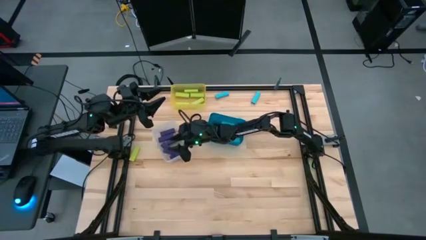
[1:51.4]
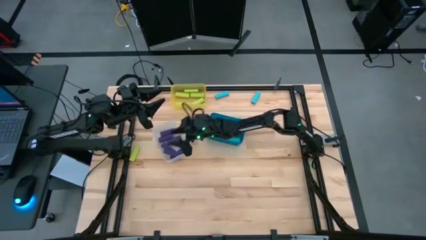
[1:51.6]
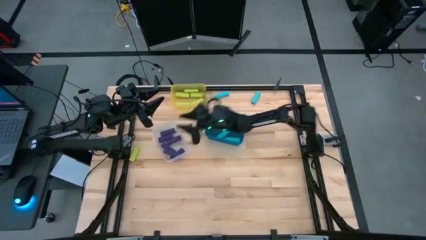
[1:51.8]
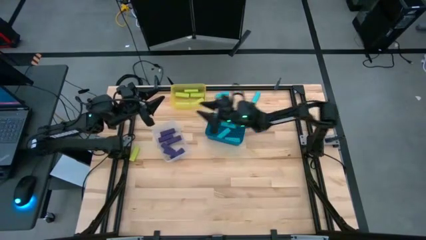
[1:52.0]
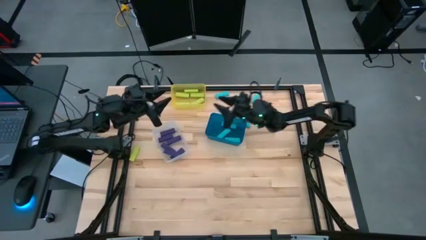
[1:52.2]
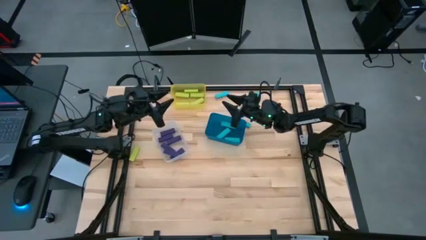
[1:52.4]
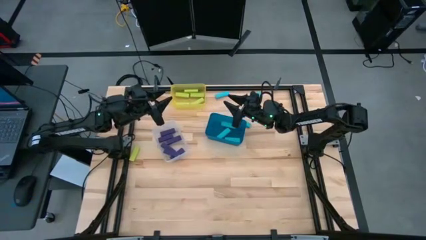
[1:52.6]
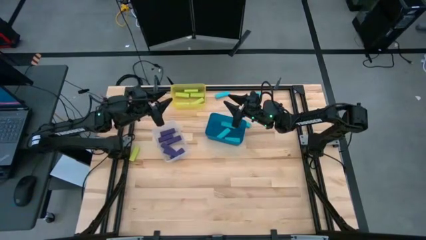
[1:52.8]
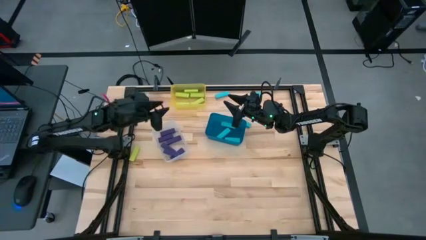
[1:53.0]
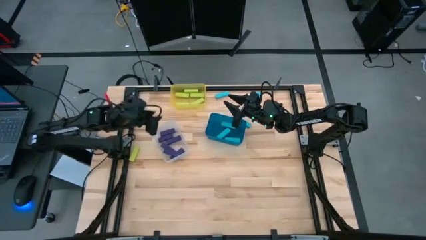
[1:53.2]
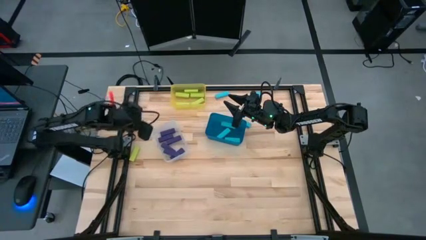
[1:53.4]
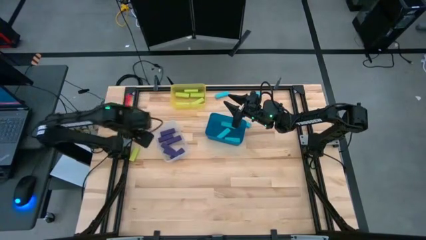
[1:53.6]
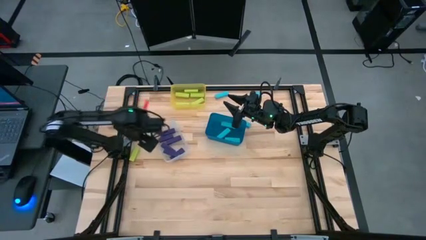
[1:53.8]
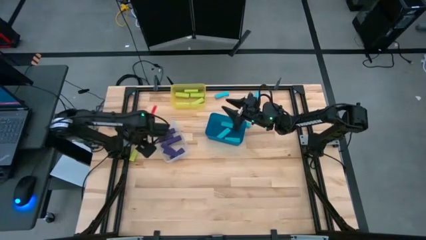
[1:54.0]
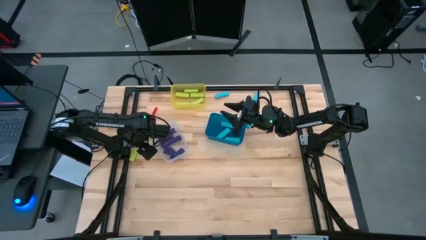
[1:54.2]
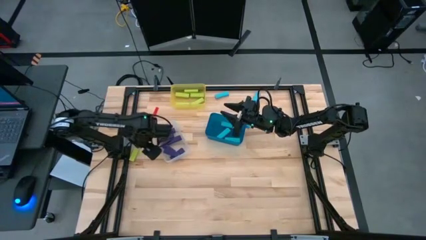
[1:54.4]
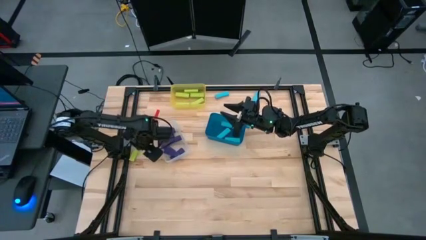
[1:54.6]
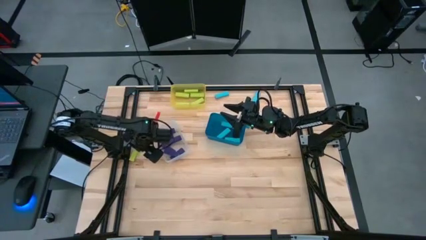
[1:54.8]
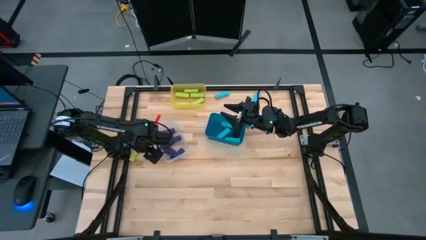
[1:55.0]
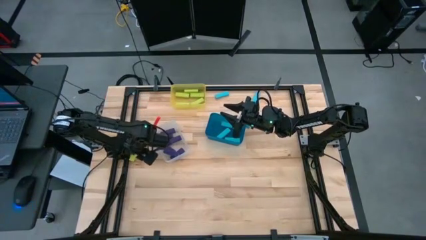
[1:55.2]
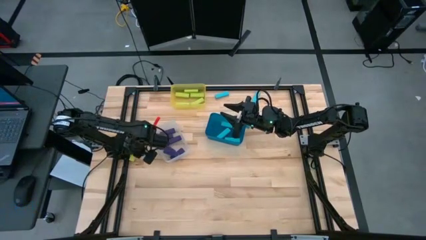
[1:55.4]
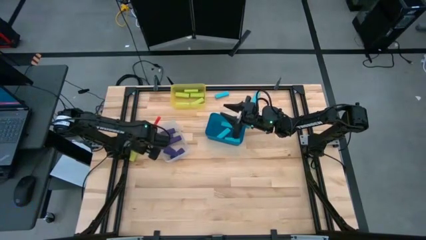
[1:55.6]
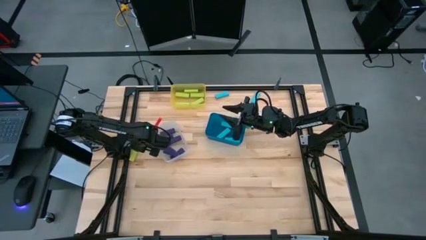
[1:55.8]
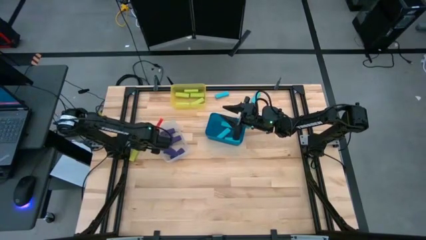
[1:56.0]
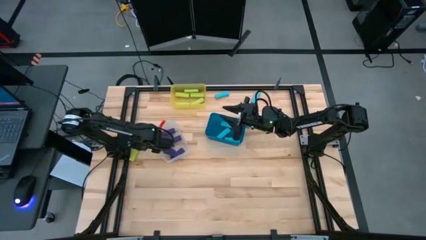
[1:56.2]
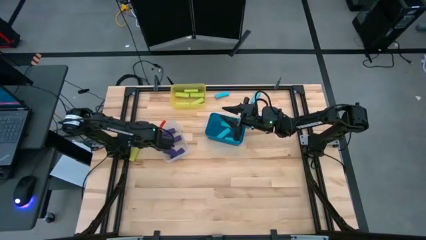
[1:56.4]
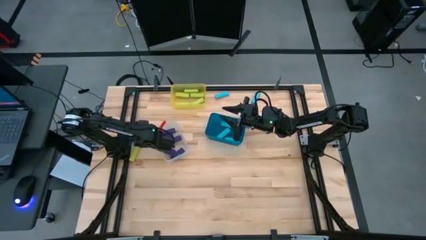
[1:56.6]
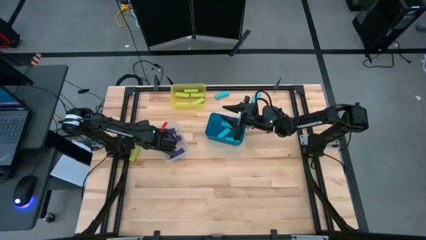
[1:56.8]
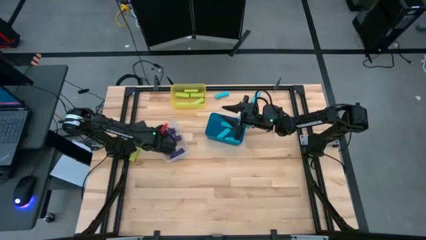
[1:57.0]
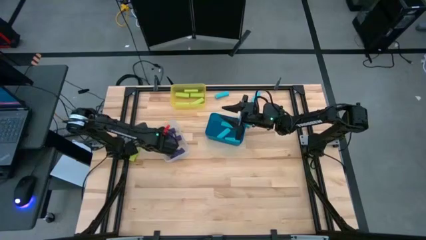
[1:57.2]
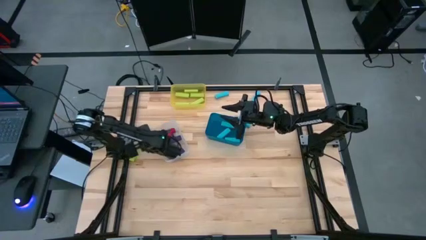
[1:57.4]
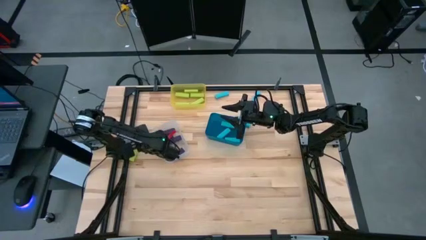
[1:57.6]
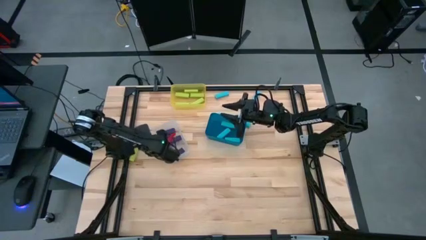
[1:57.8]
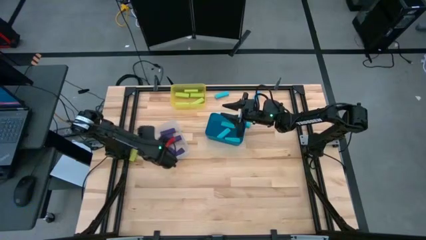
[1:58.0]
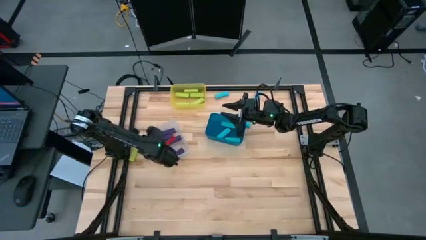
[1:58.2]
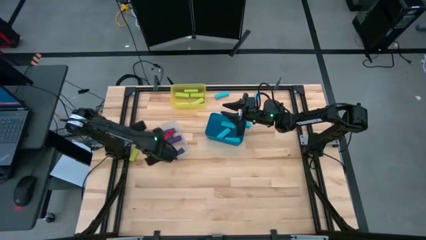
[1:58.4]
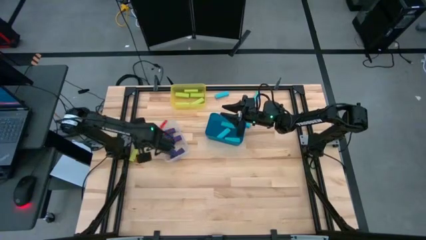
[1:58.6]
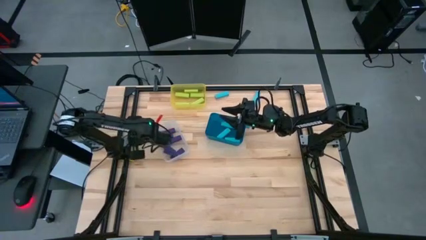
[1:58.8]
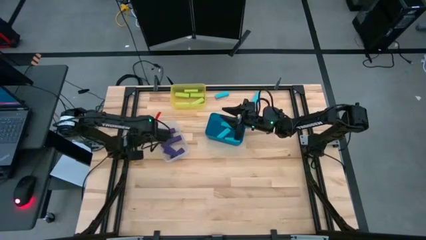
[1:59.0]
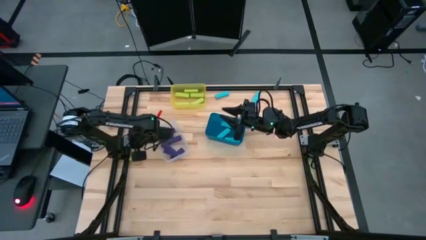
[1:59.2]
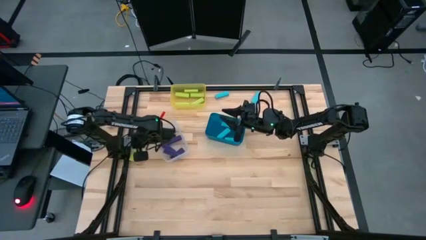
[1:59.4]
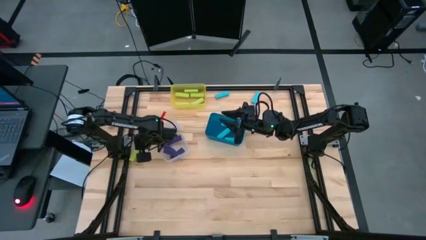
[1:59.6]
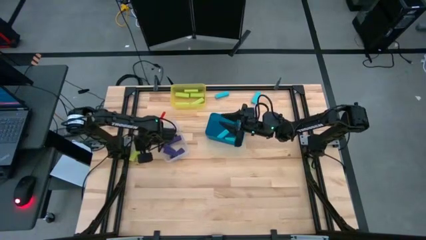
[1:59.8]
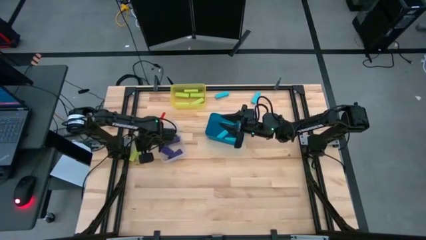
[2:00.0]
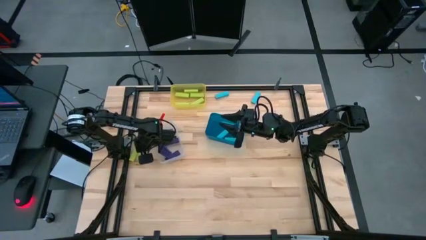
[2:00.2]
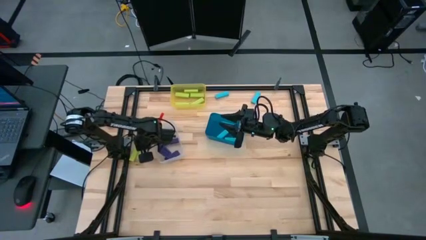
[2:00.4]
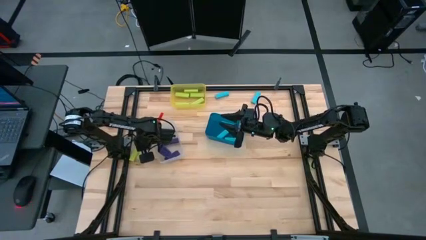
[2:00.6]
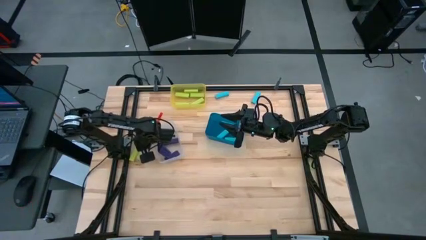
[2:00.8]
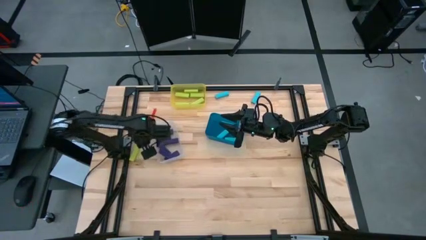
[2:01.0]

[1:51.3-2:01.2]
Task: Sort blocks
Put the green block into the yellow bin

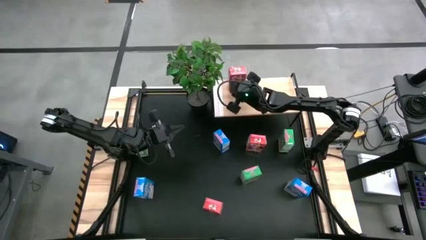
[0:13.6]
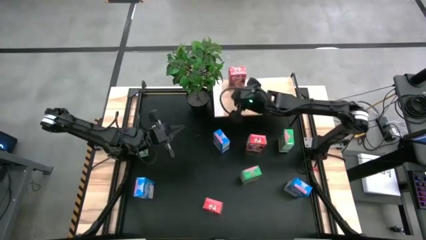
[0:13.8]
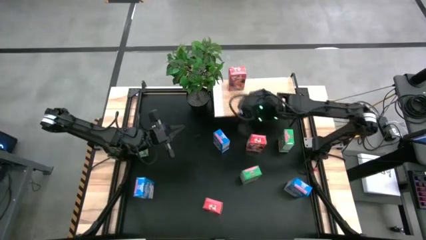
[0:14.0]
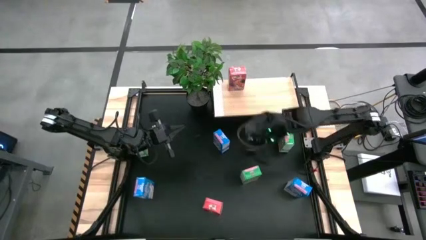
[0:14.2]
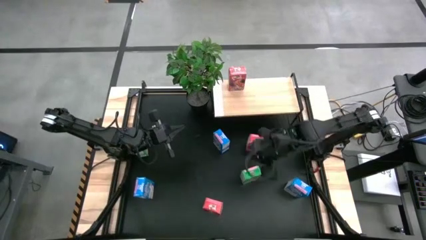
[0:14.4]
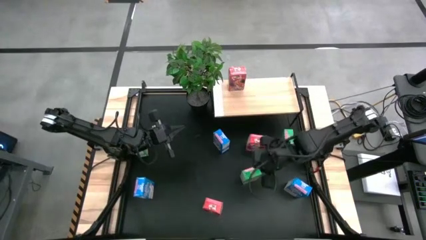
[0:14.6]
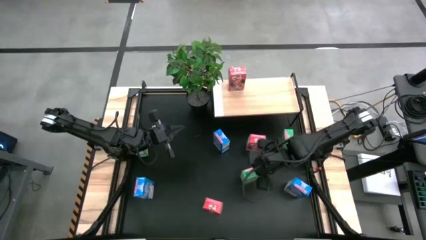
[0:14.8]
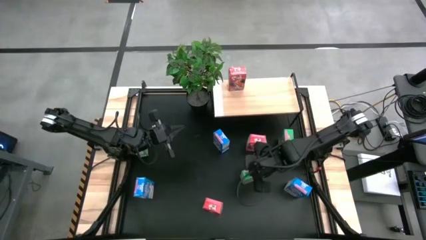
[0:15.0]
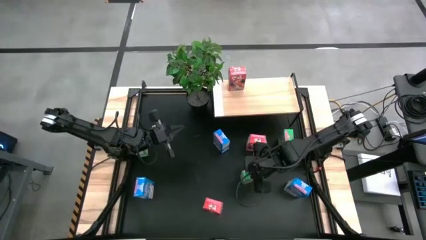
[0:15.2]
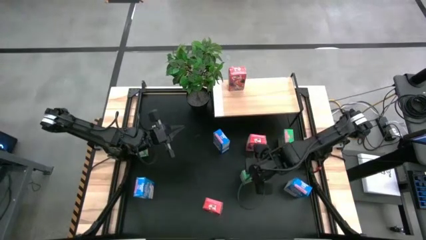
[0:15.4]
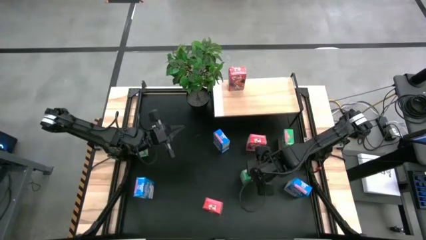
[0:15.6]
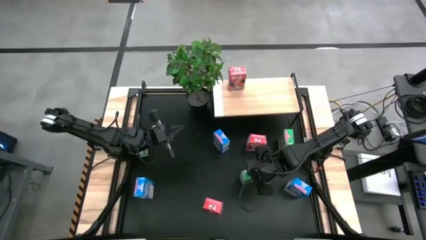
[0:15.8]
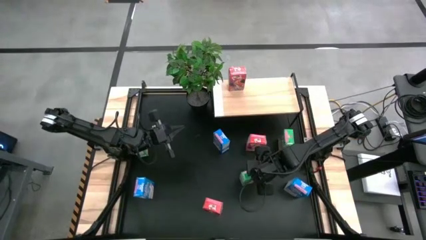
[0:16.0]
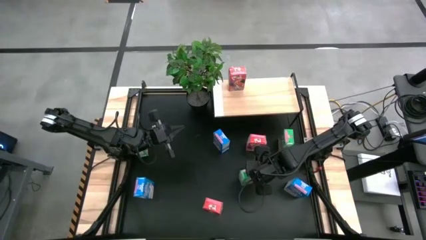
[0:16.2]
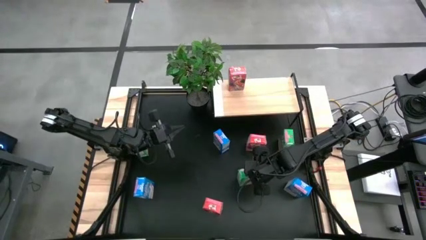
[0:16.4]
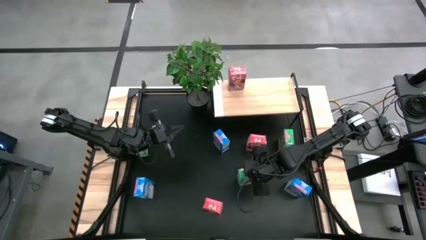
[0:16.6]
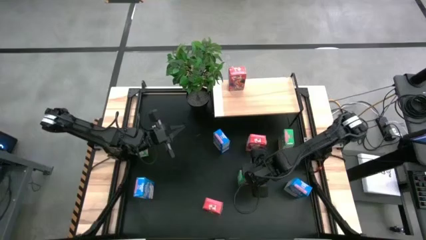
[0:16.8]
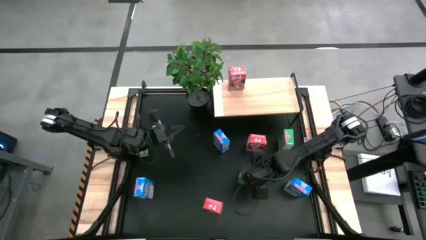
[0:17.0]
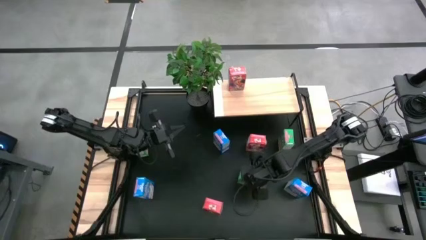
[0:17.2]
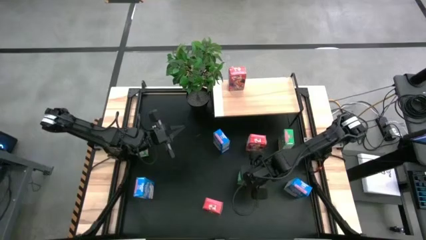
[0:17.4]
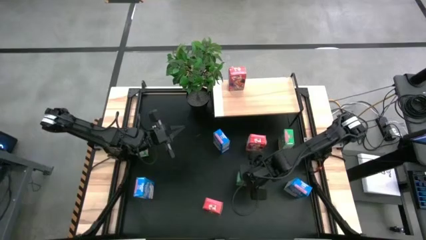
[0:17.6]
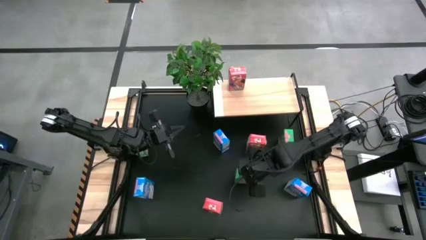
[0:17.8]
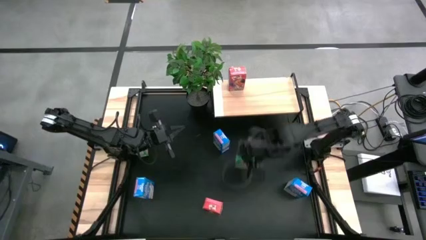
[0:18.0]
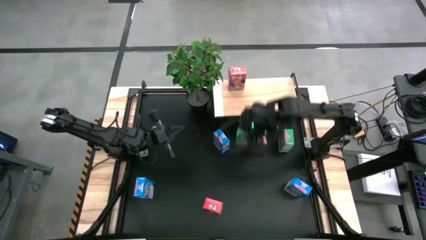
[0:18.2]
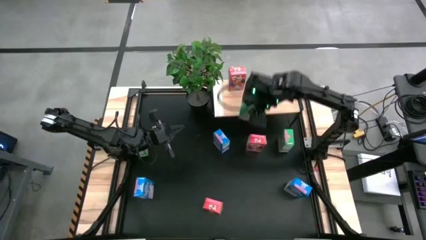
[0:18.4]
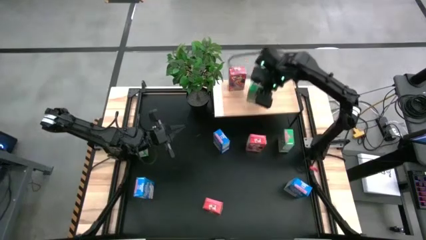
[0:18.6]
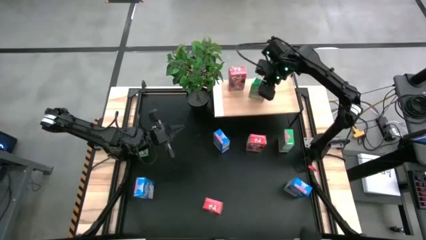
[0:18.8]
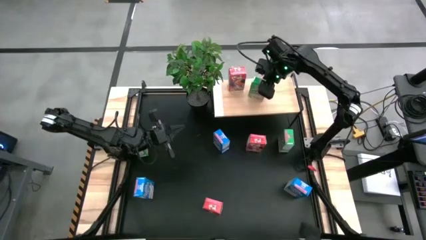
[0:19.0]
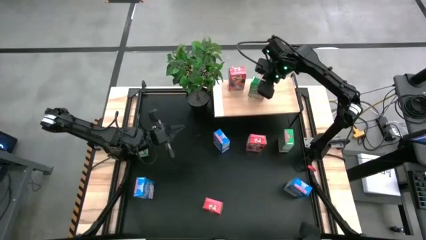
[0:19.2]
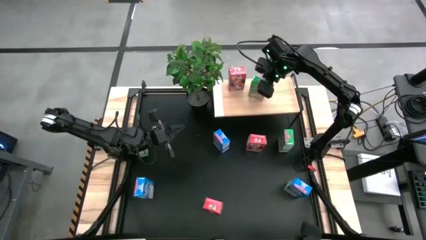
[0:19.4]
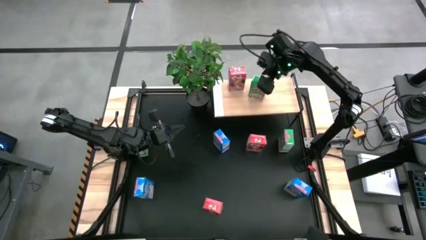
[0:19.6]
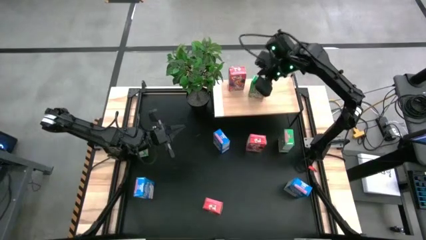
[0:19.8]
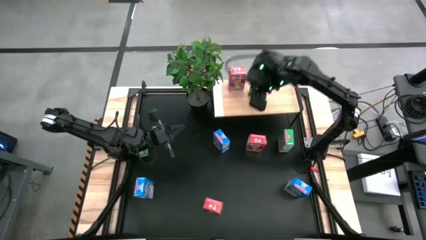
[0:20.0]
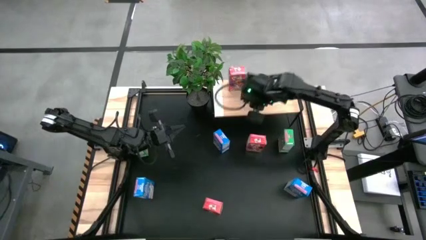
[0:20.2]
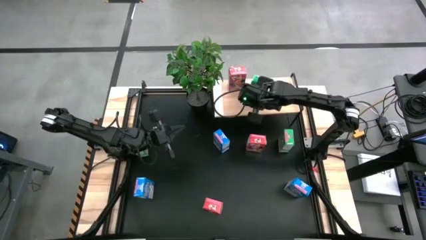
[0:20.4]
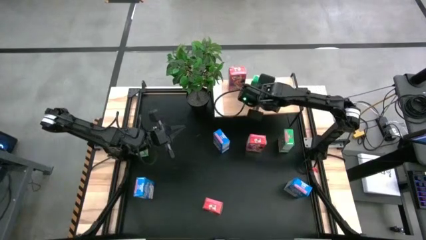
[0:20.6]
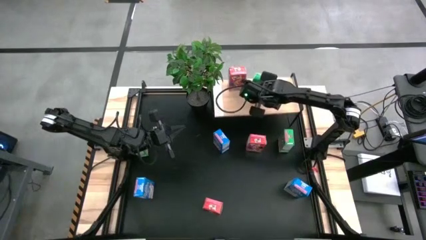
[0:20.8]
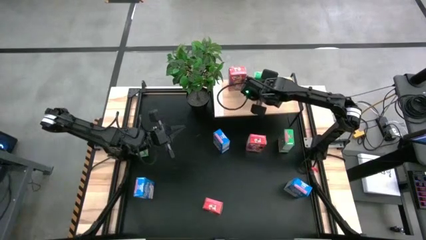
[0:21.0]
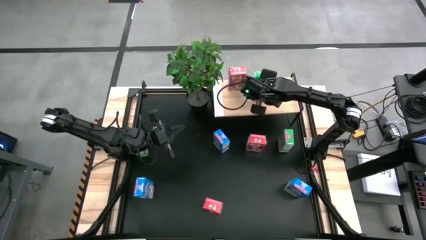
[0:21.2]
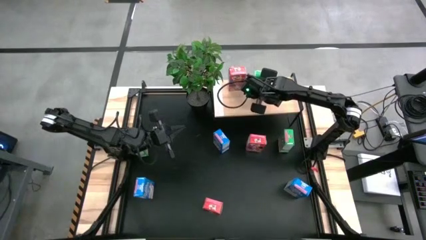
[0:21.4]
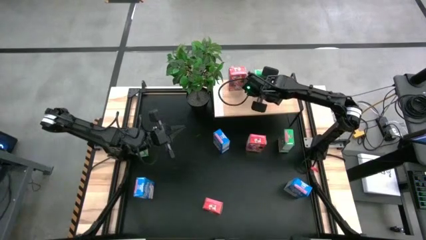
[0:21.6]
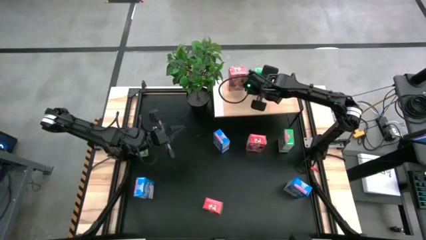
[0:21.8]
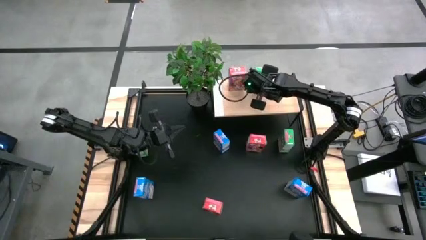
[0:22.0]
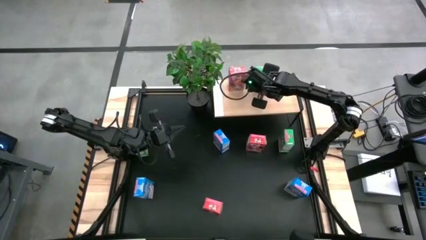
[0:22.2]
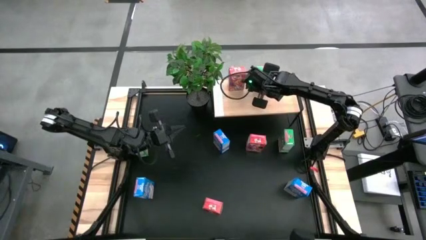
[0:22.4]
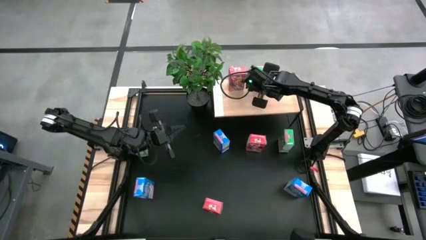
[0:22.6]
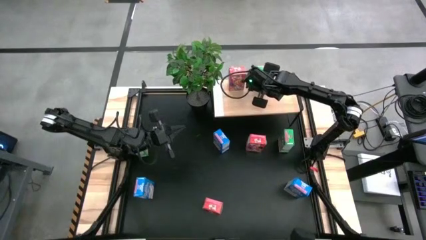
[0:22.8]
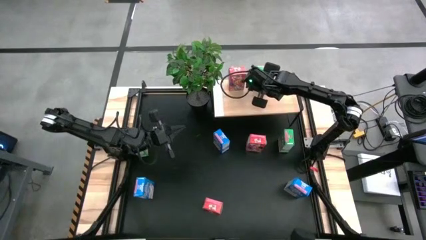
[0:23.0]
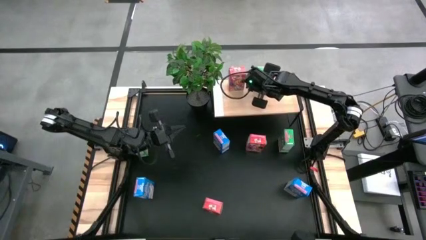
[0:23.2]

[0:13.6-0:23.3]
Task: Stack cereal on shelf
Put the bottom green cereal box on the shelf
